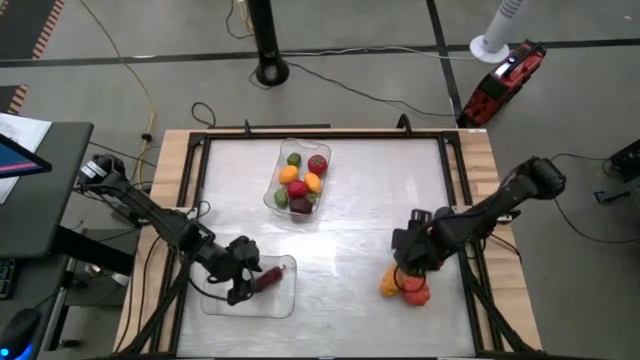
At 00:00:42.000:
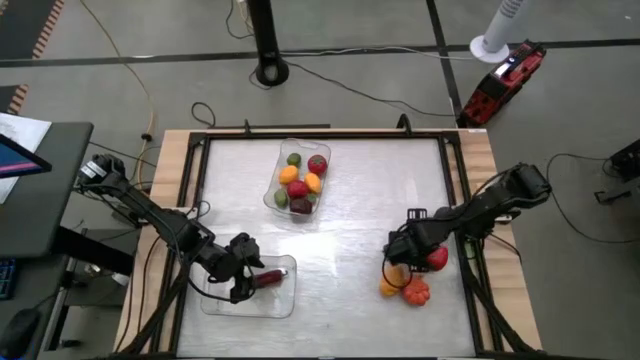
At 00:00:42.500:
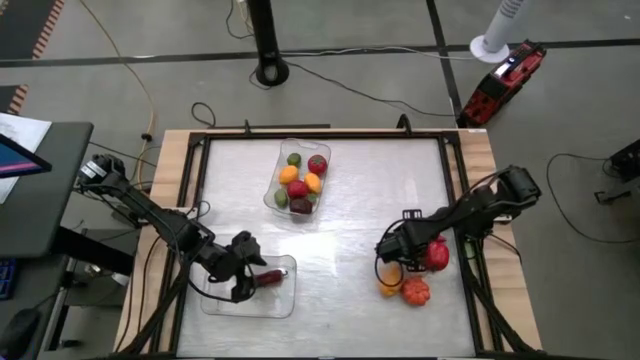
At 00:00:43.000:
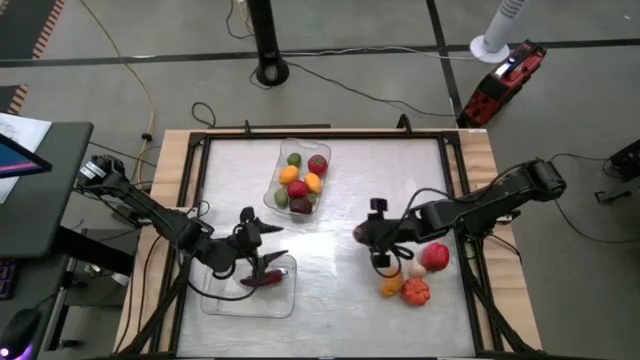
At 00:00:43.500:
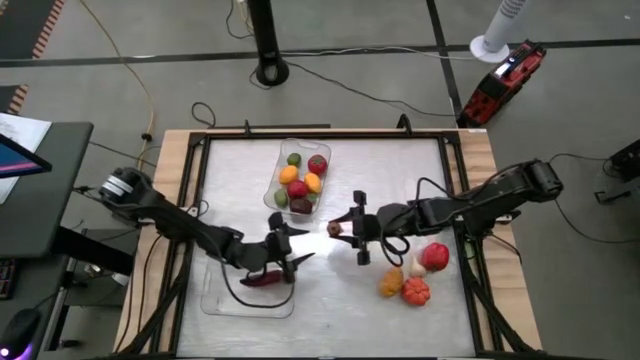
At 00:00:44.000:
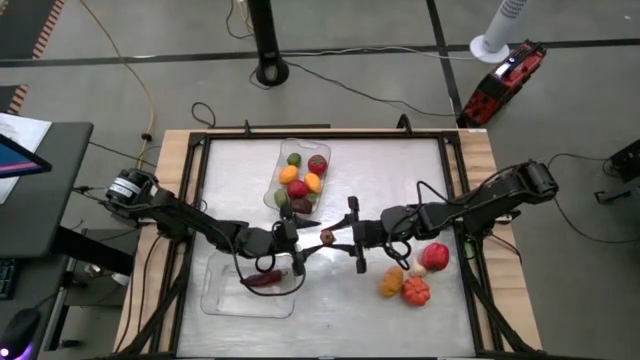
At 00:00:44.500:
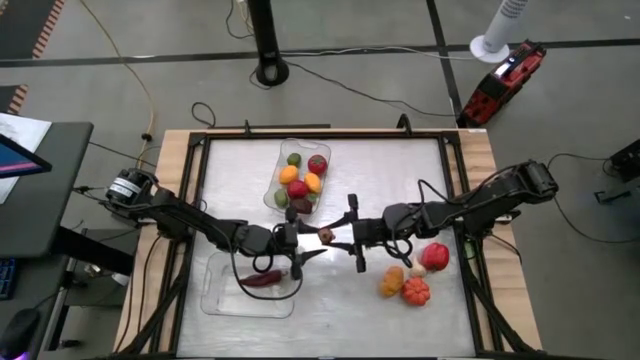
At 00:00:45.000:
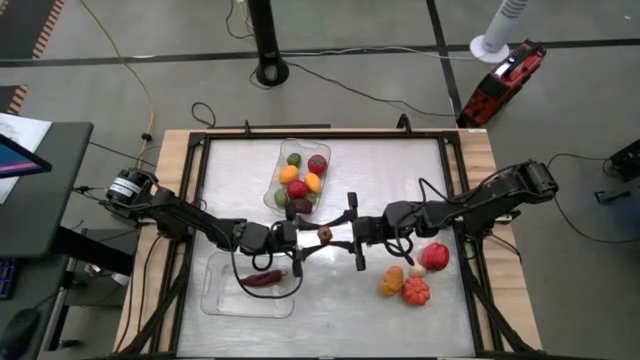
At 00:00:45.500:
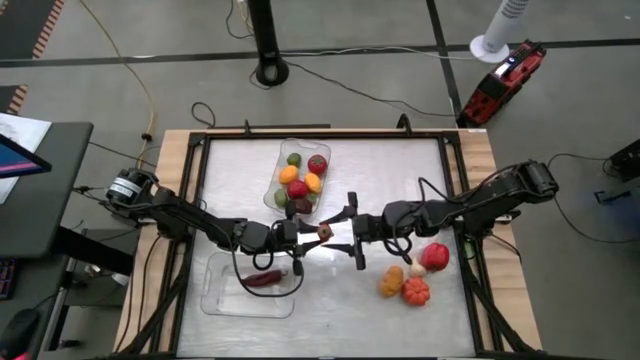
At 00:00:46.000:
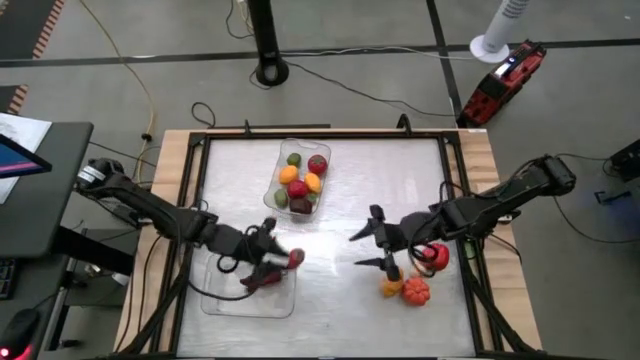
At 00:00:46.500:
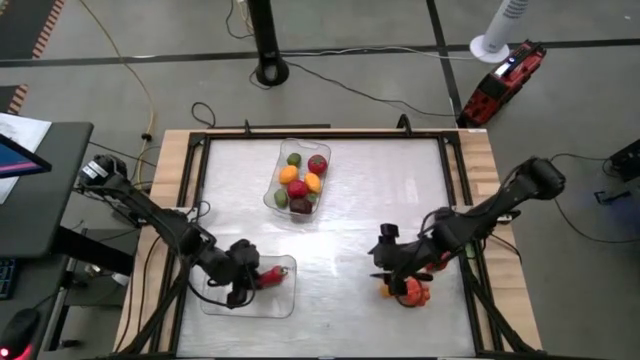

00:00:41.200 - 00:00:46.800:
Task: Sort produce into baskets
Put the chili pepper into the bottom transparent bin

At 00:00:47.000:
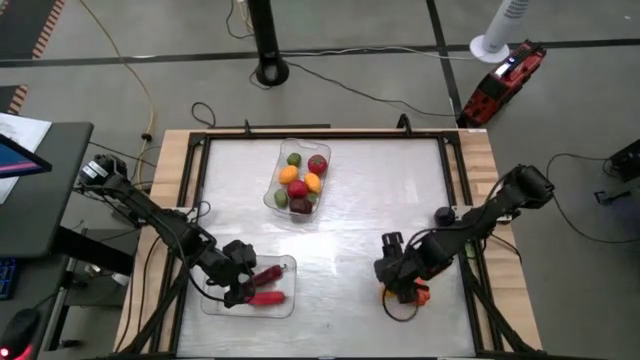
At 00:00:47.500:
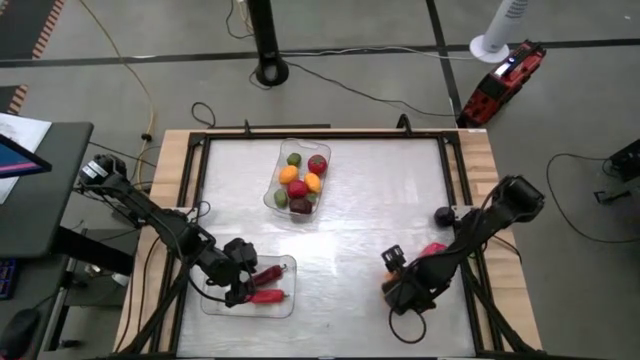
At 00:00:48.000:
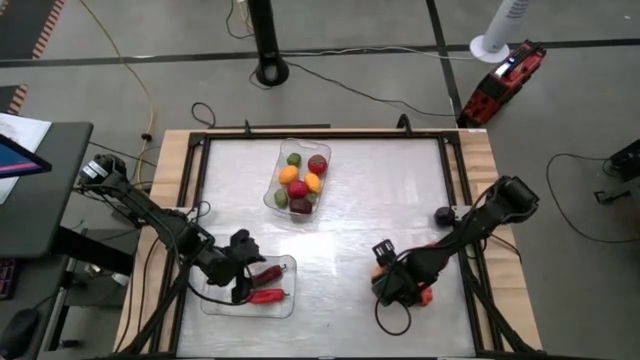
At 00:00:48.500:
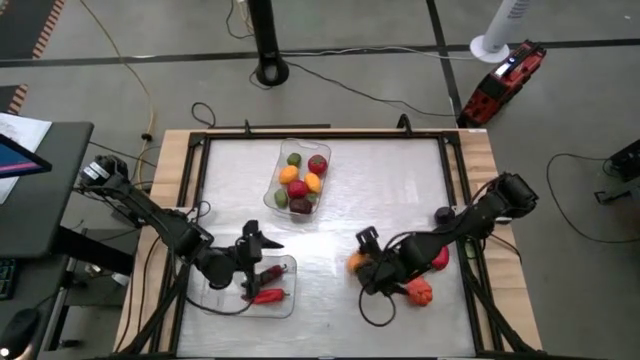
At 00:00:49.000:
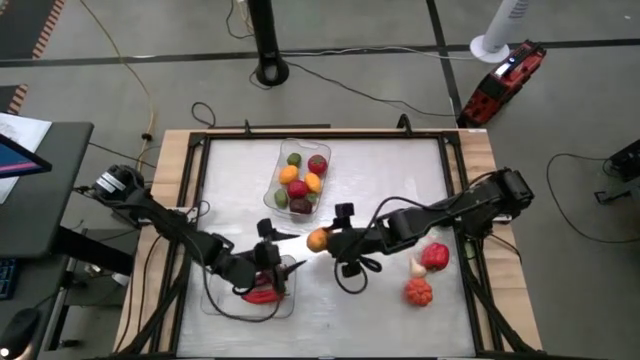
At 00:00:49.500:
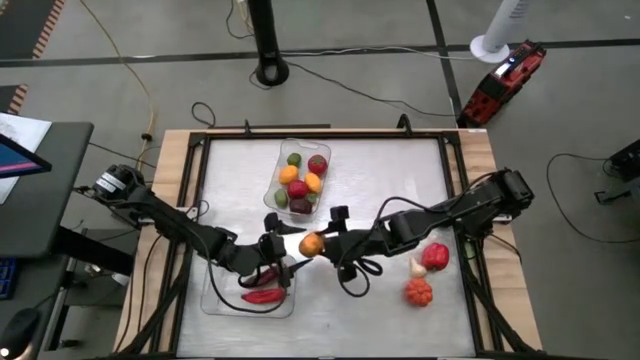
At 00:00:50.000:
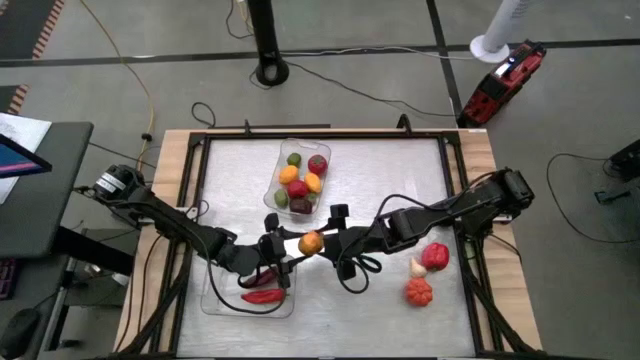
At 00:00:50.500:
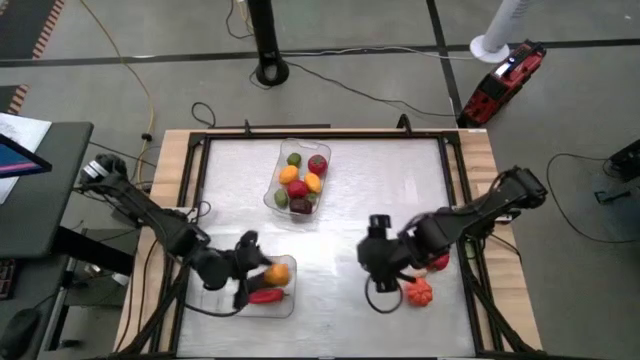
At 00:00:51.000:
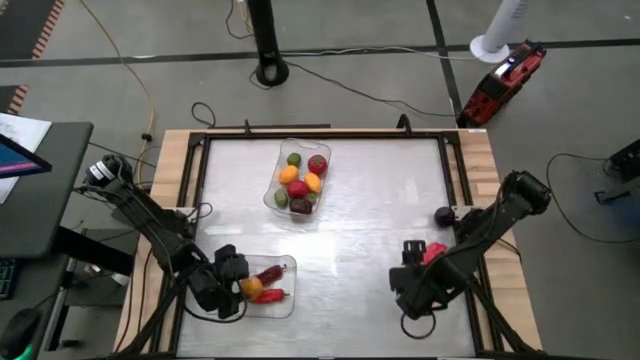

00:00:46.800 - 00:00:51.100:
Put the potato into the bottom transparent bin

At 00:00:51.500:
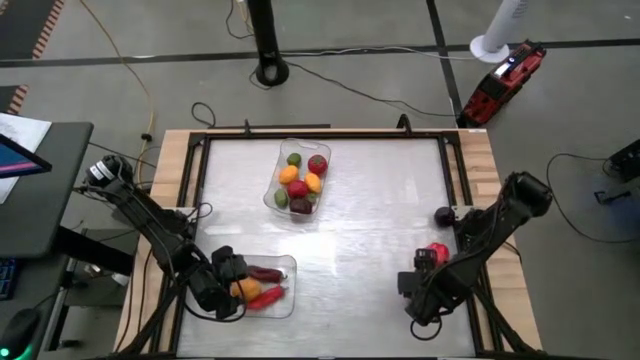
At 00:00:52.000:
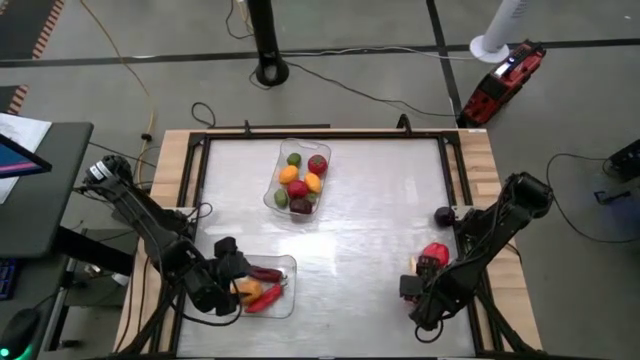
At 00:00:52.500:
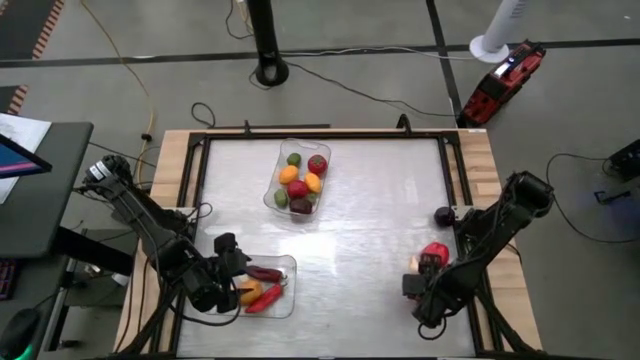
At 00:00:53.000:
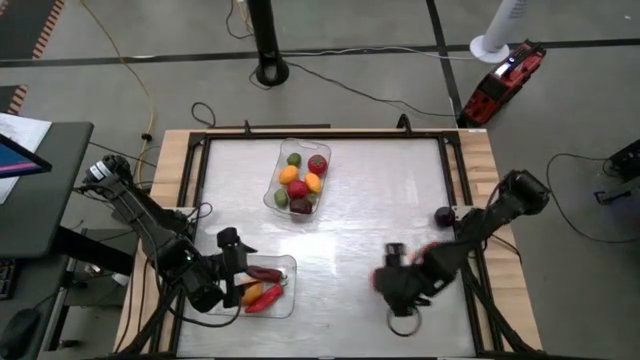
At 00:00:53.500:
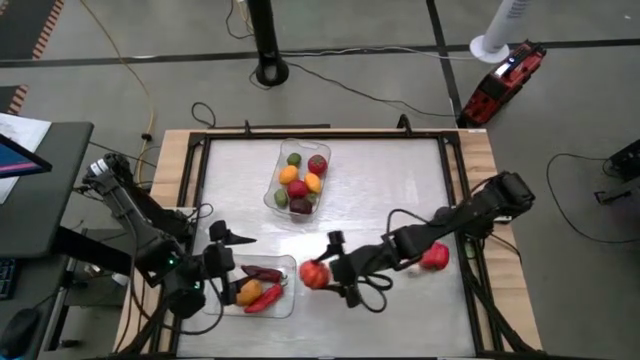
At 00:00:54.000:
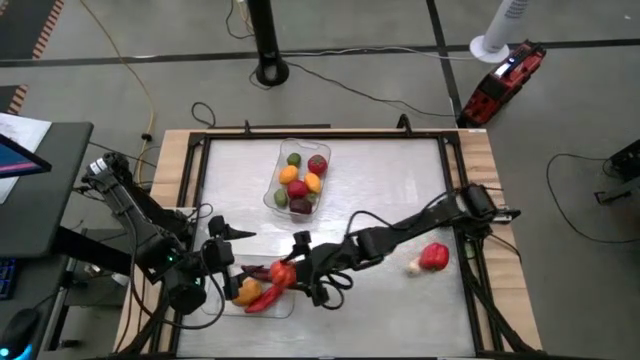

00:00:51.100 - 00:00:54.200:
Put the squash into the bottom transparent bin

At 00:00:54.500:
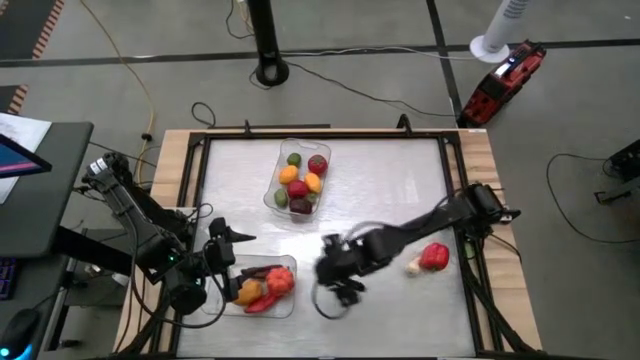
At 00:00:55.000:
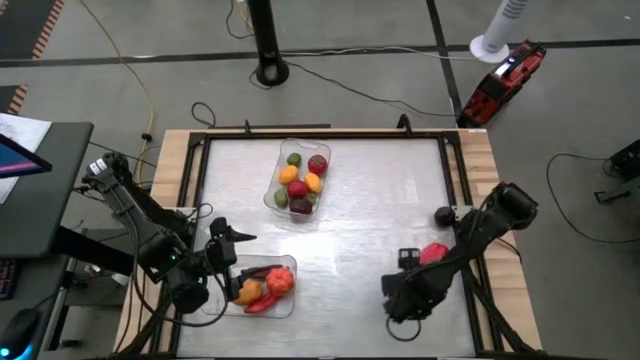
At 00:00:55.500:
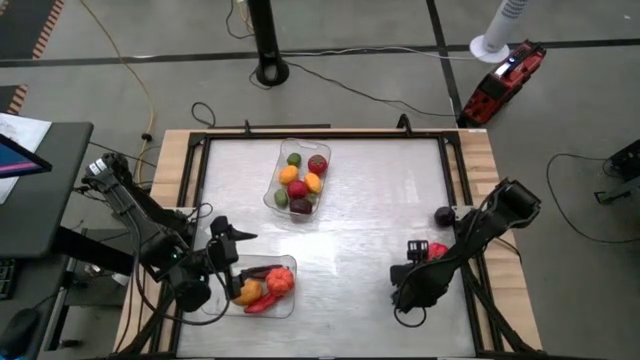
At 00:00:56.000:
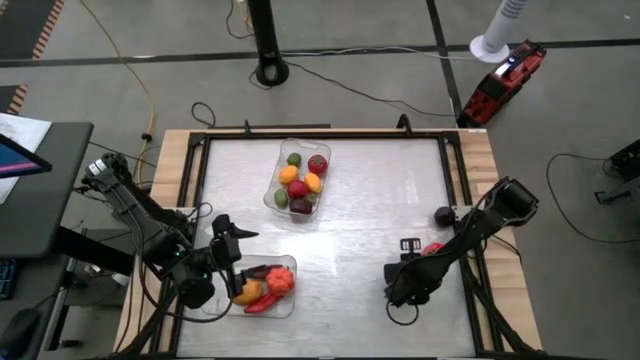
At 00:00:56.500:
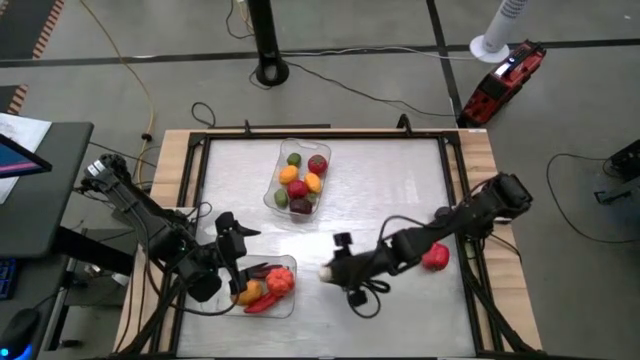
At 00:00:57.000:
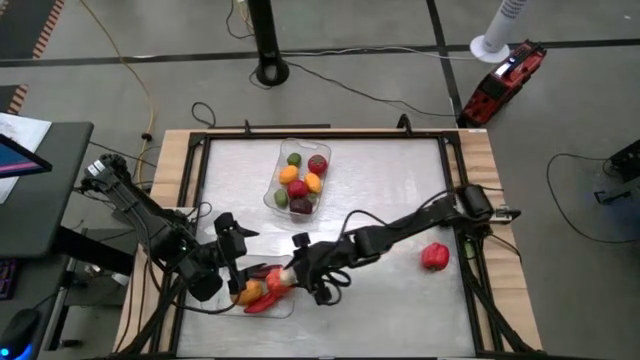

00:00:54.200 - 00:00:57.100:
Put the garlic into the bottom transparent bin

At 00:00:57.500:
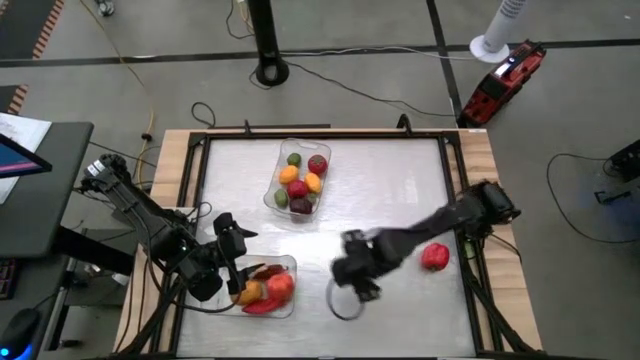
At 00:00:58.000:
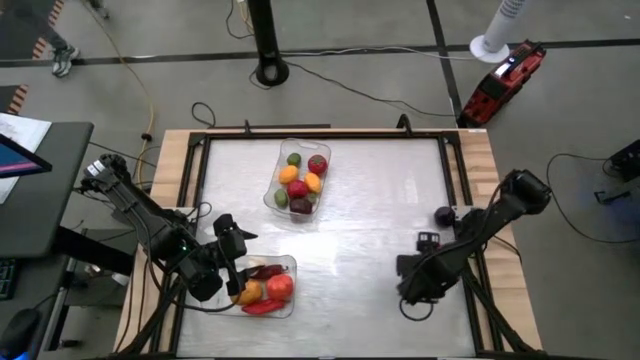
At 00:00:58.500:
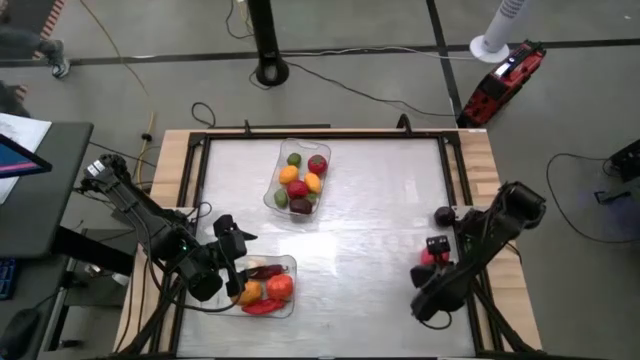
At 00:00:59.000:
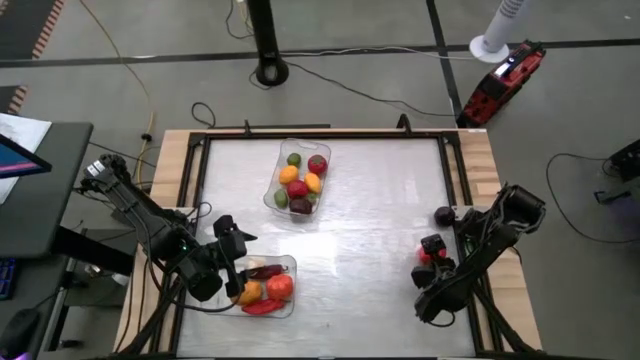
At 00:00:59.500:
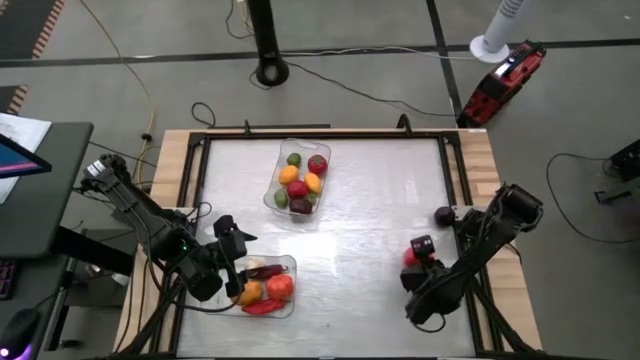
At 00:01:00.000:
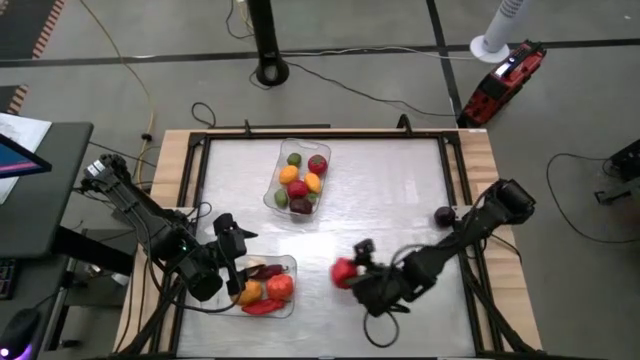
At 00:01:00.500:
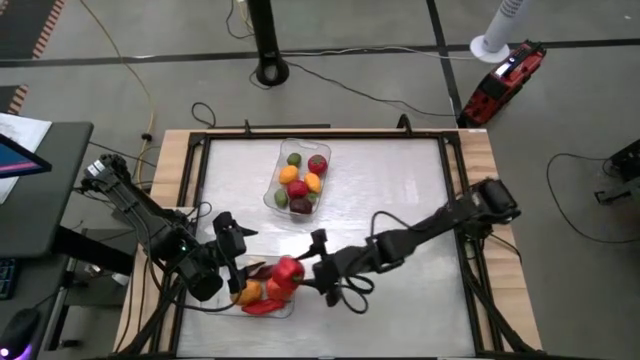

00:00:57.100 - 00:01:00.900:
Put the bell pepper into the bottom transparent bin

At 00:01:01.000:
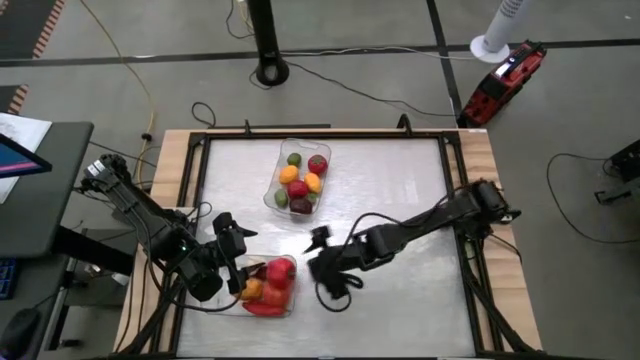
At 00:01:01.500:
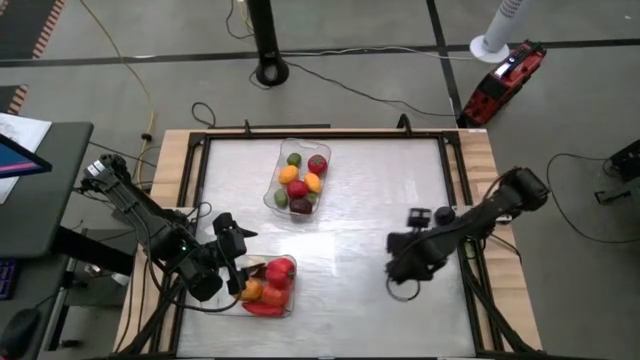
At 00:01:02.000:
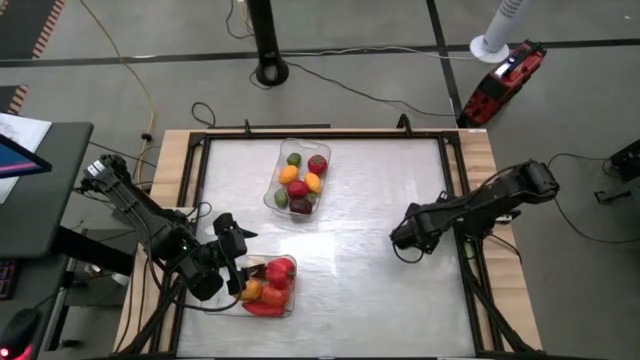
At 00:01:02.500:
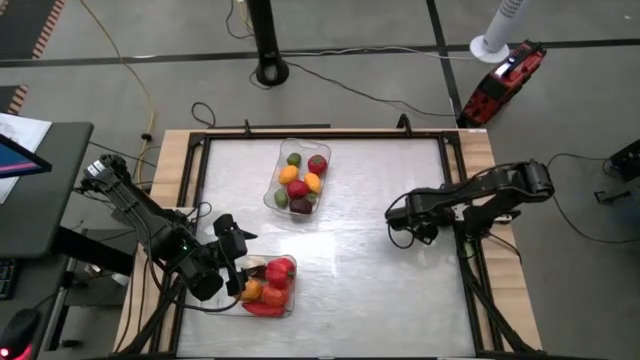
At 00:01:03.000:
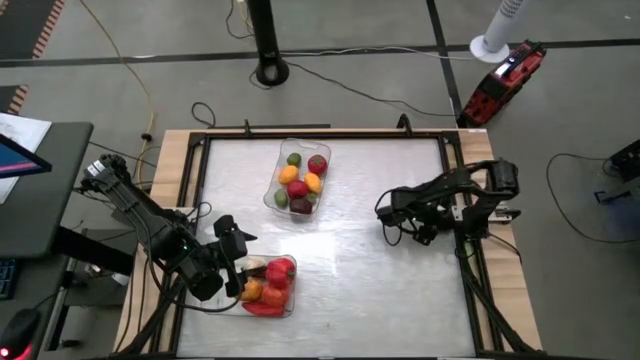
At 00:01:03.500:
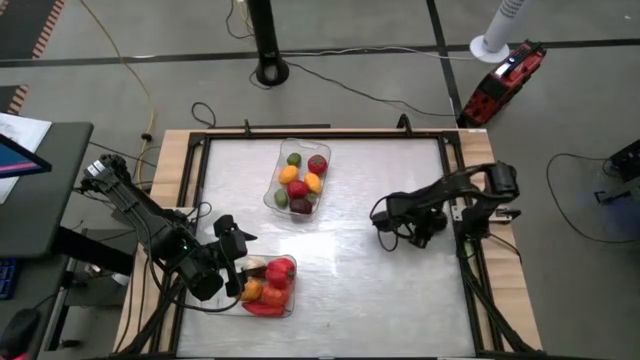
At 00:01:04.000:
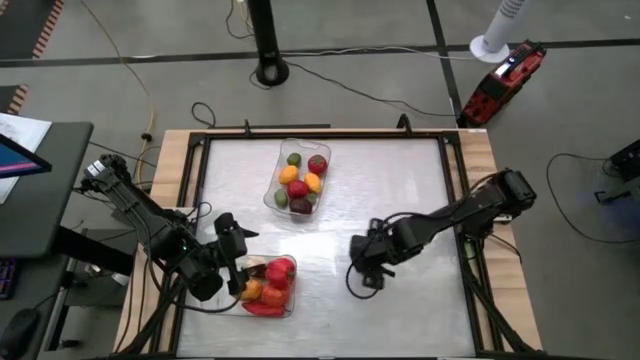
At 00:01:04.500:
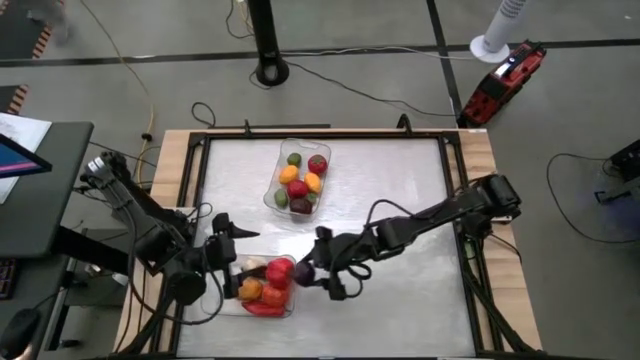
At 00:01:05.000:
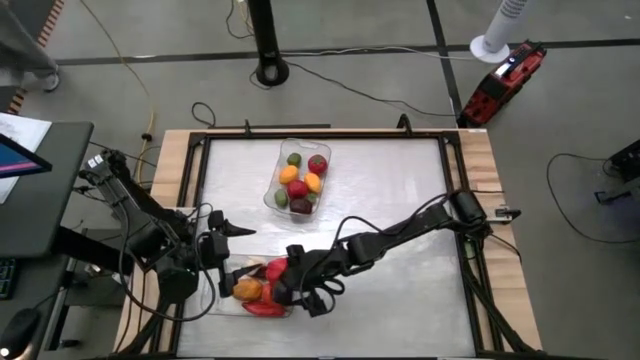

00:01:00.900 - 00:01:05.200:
Put the onion into the bottom transparent bin
